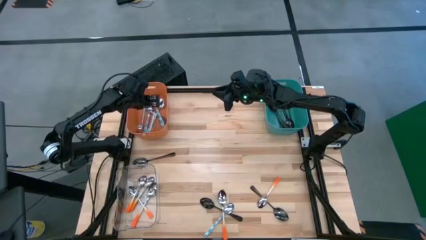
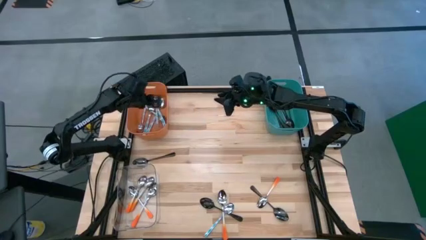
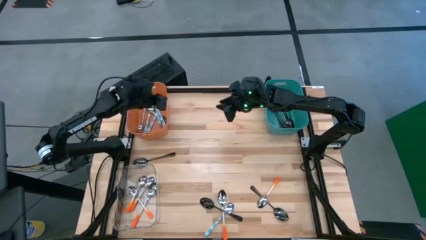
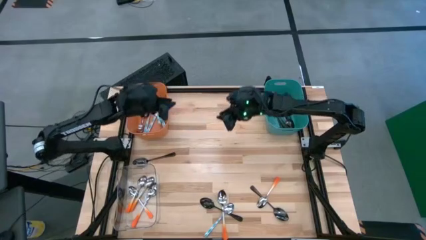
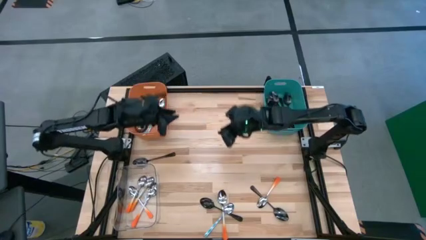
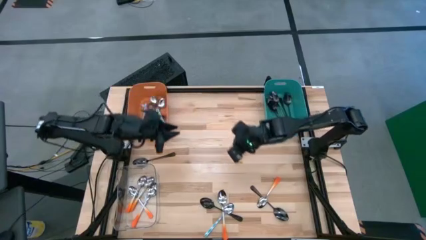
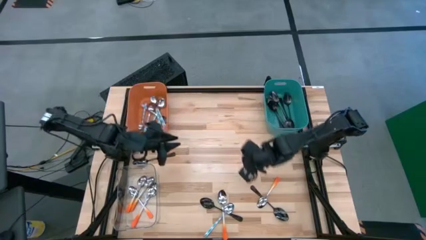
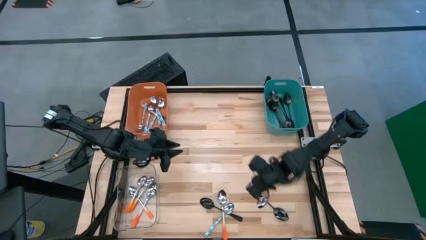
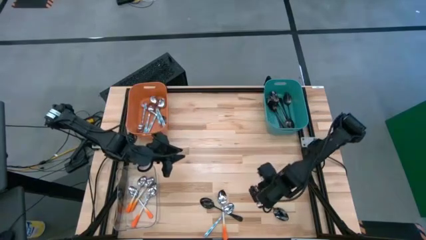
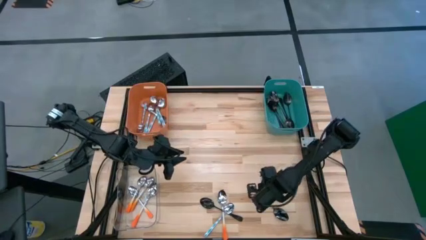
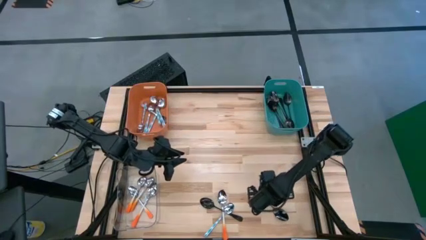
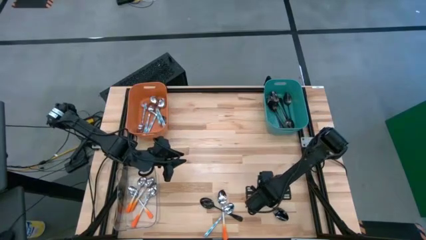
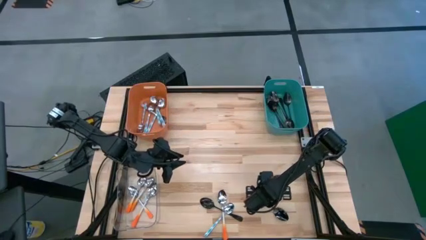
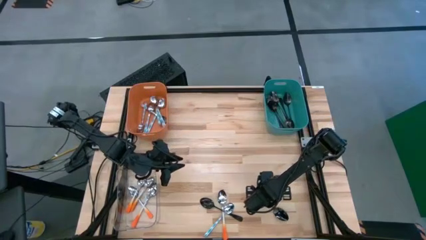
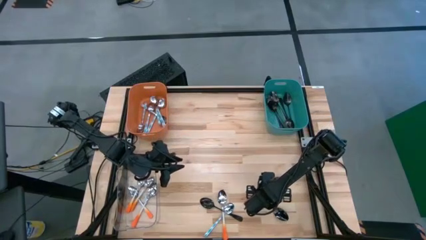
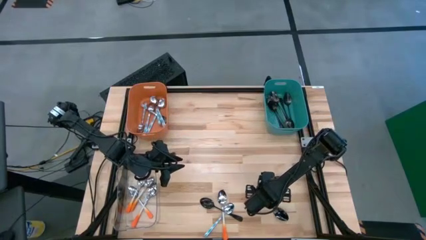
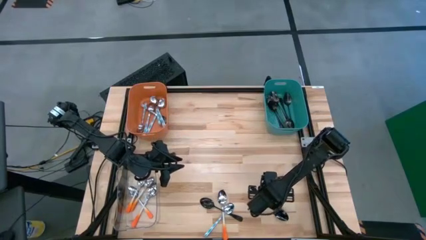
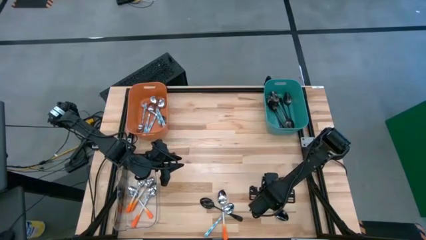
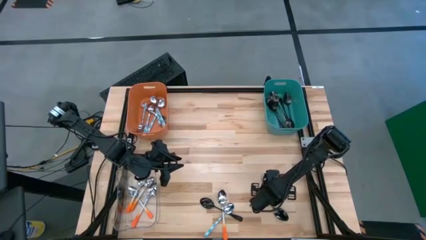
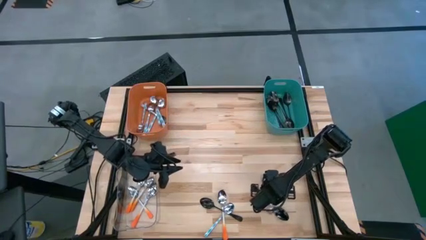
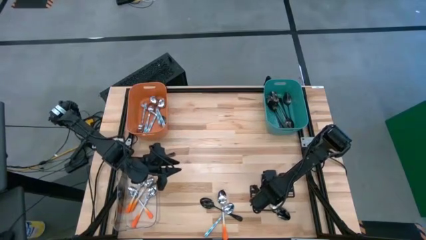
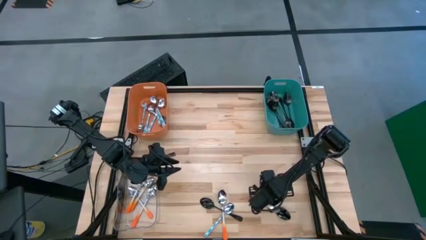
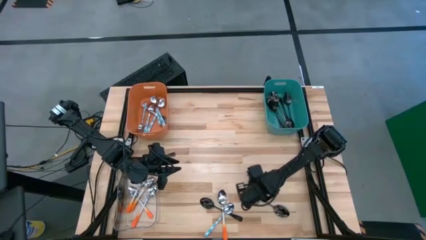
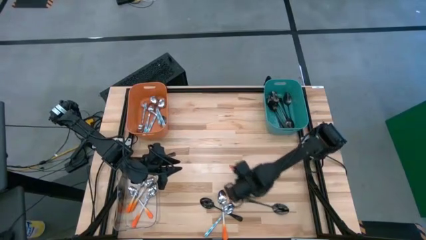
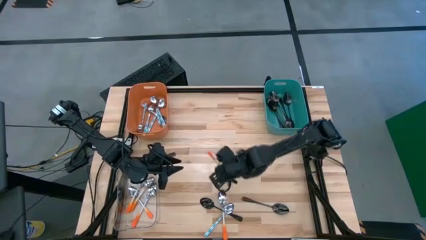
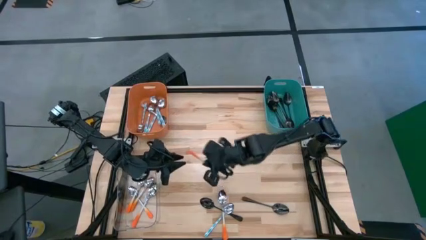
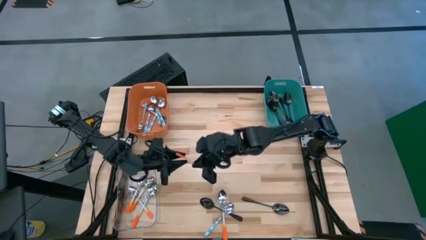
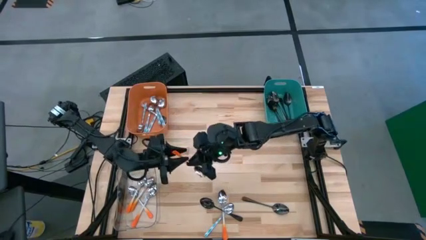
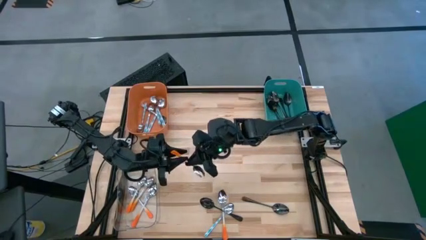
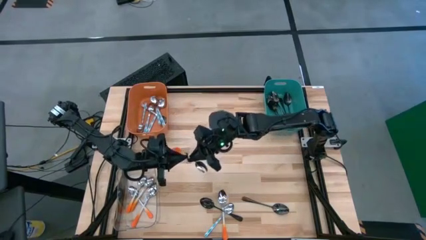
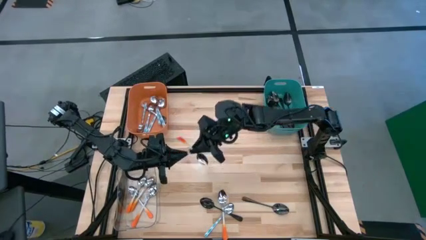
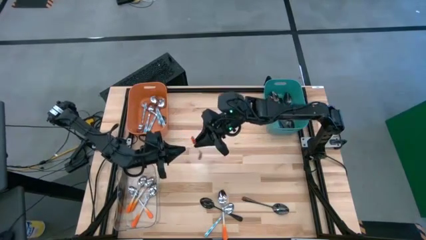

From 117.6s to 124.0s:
Task: Sort silverware by color (type)
Put the orange spoon into the transparent bin

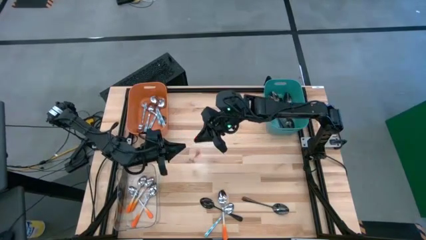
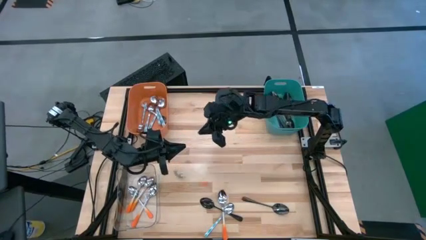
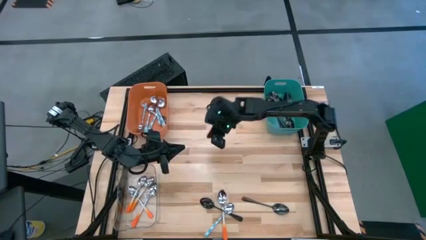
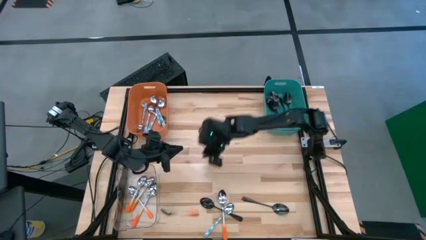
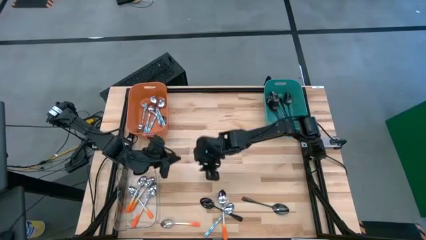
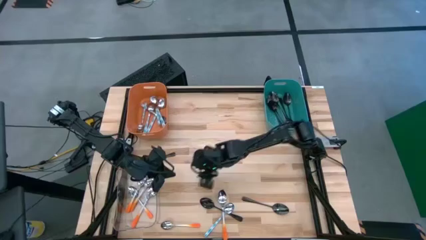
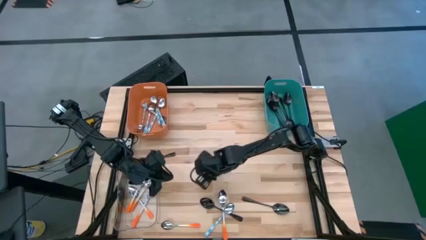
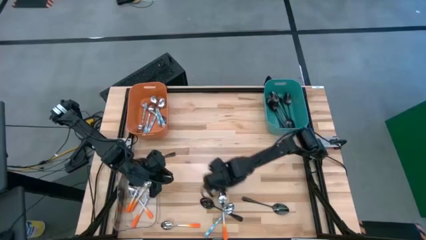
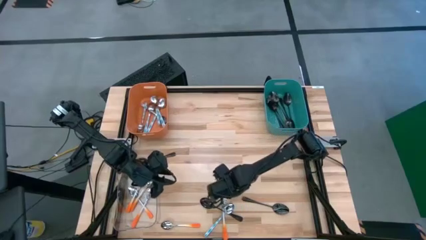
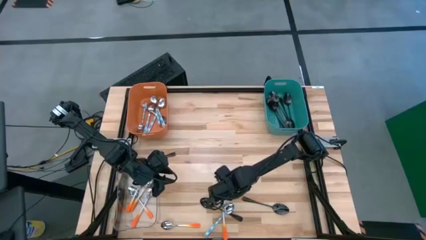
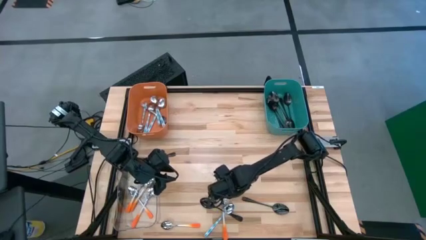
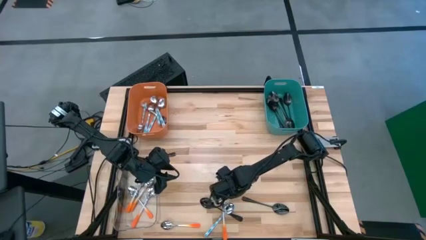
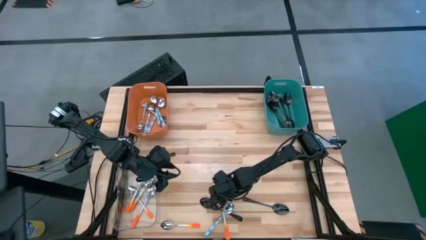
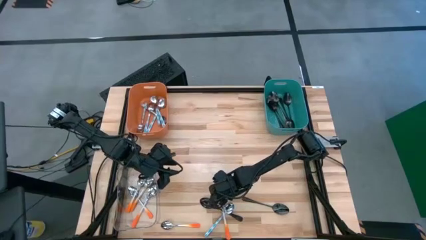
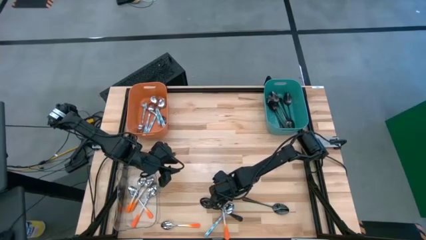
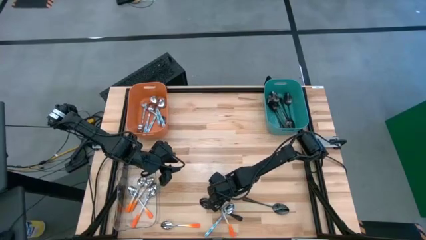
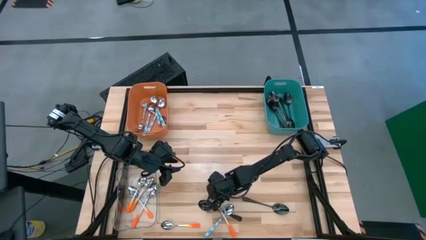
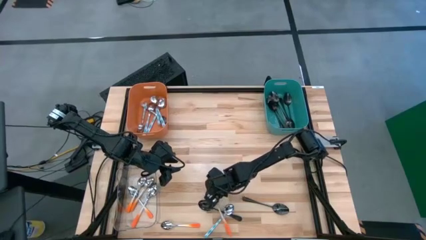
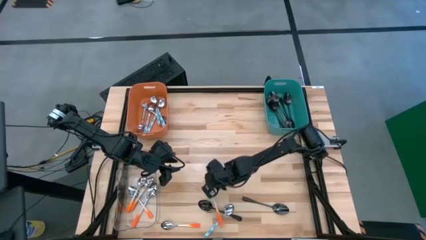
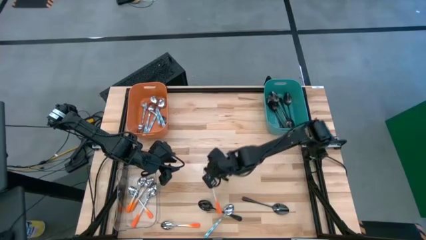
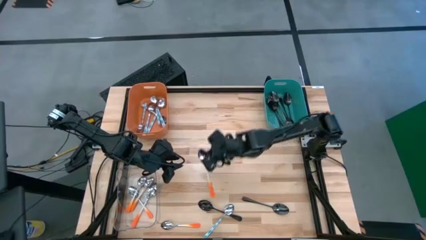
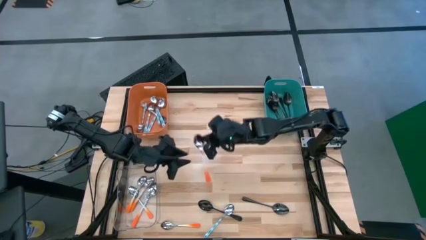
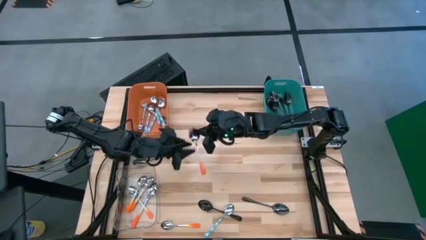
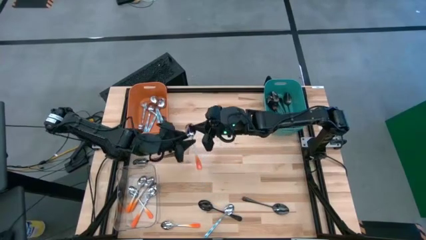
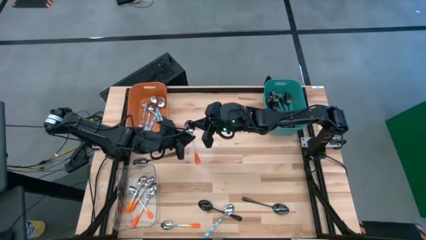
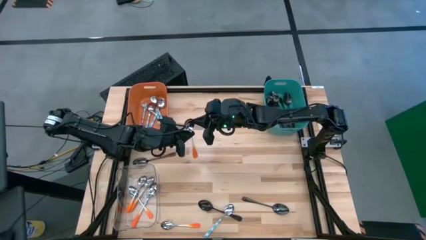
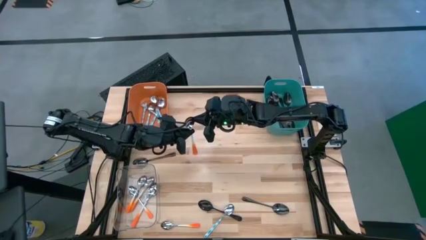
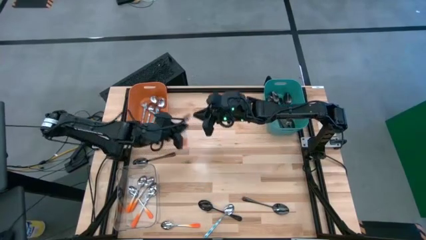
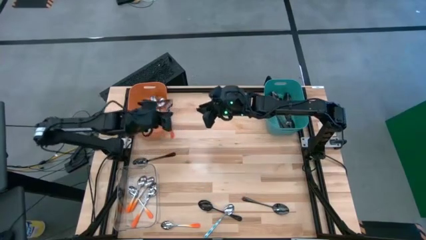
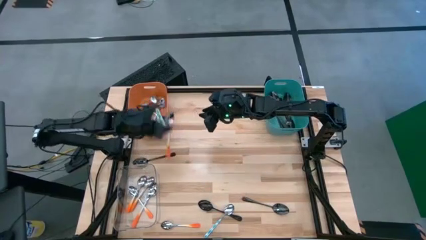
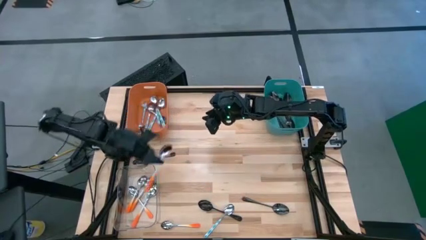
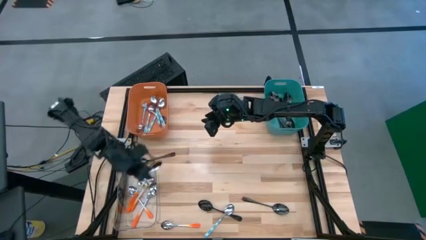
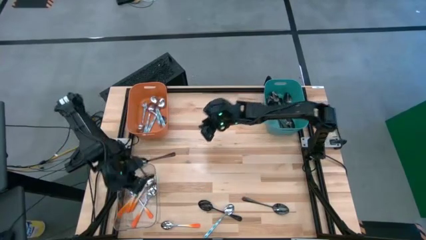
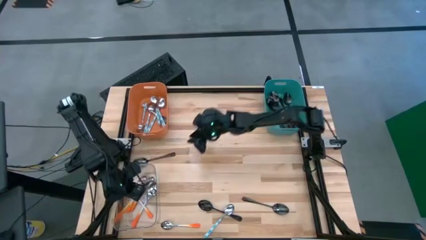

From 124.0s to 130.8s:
Put the orange spoon into the transparent bin
